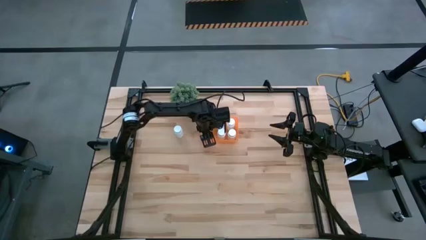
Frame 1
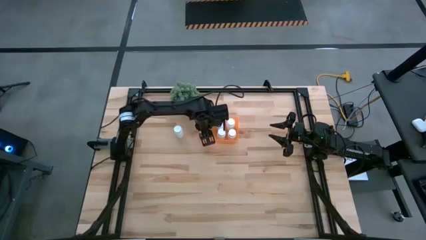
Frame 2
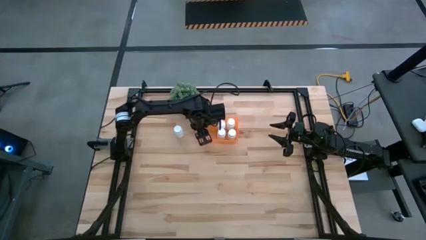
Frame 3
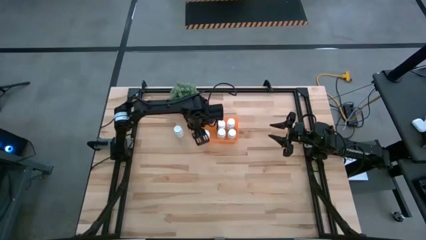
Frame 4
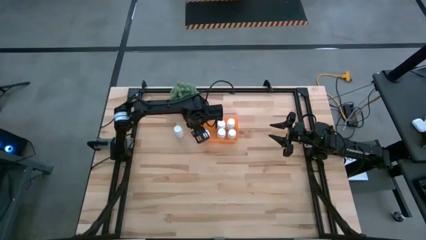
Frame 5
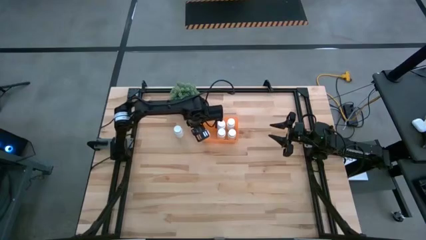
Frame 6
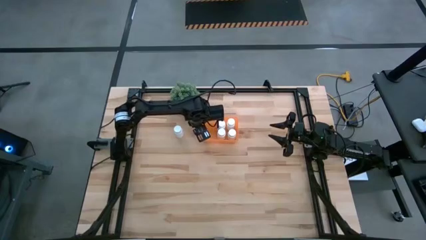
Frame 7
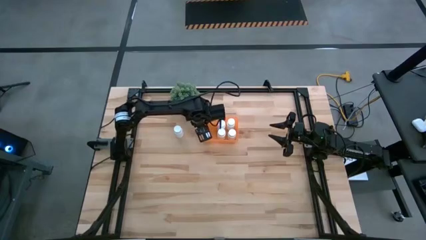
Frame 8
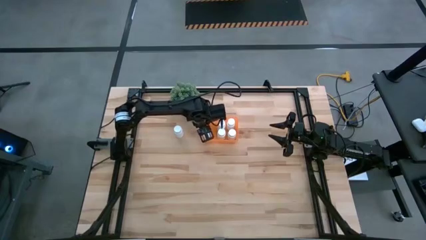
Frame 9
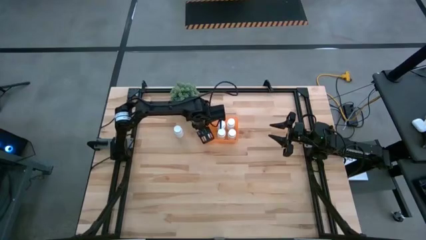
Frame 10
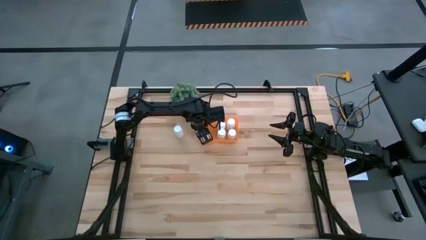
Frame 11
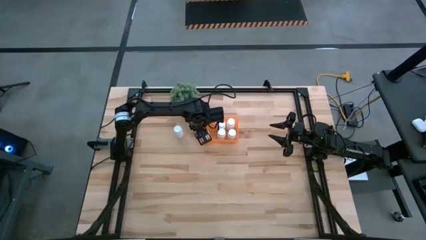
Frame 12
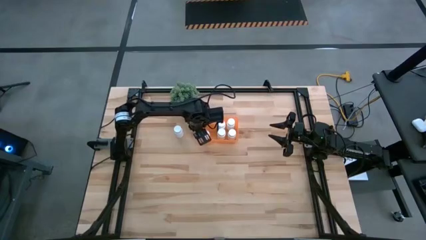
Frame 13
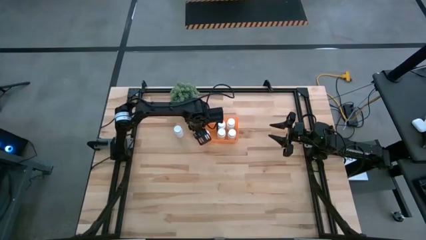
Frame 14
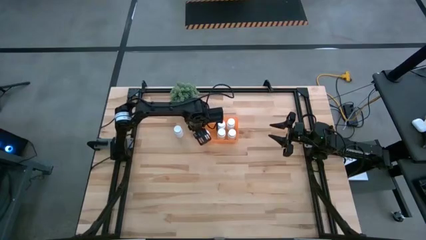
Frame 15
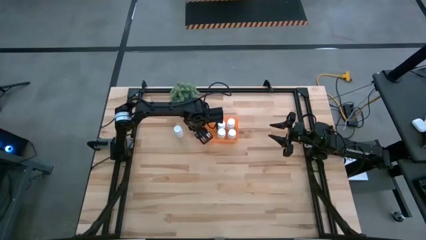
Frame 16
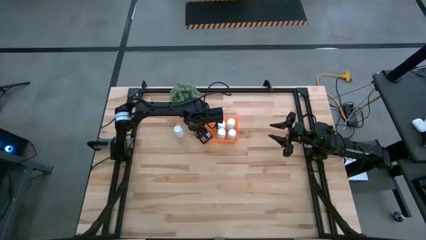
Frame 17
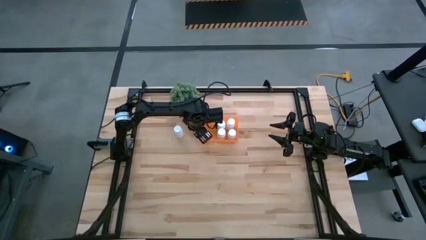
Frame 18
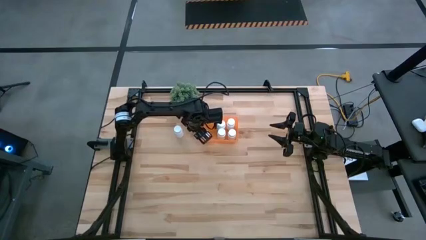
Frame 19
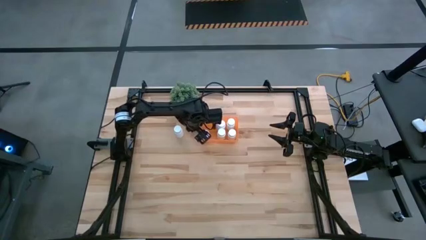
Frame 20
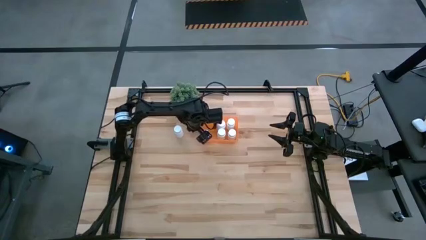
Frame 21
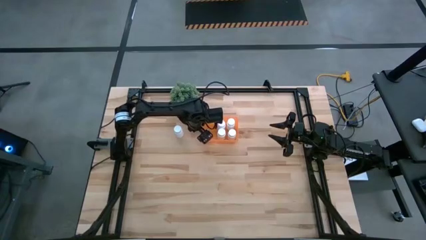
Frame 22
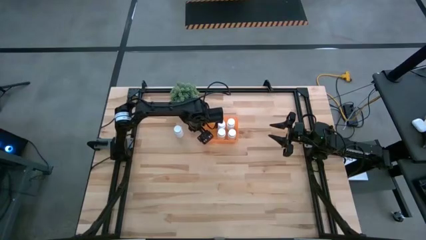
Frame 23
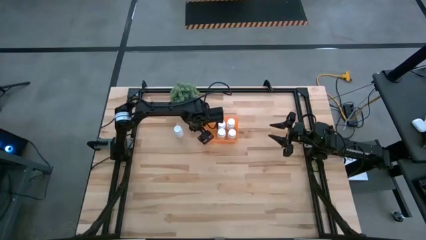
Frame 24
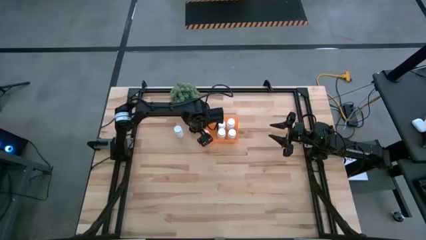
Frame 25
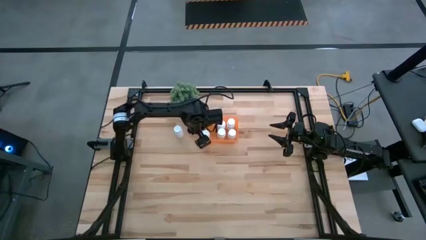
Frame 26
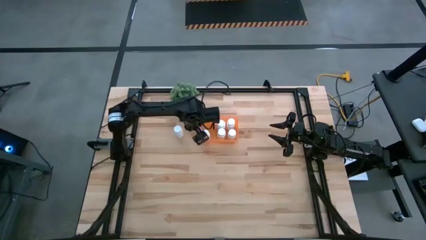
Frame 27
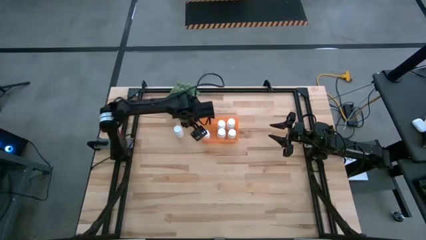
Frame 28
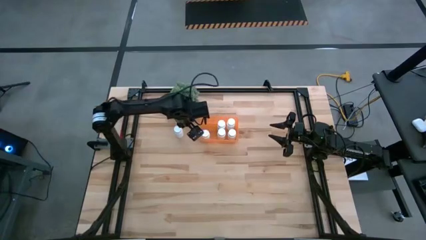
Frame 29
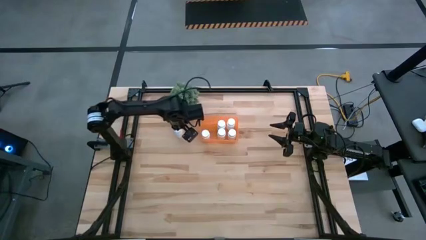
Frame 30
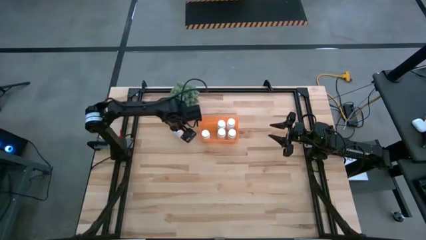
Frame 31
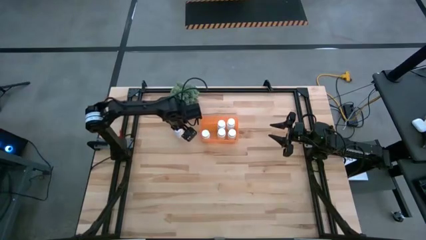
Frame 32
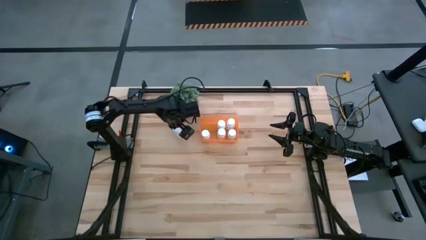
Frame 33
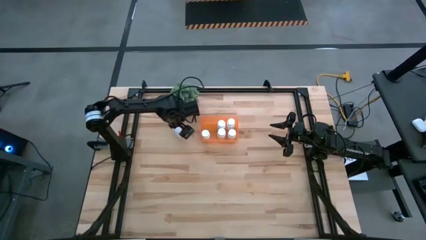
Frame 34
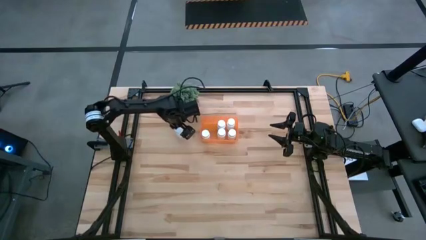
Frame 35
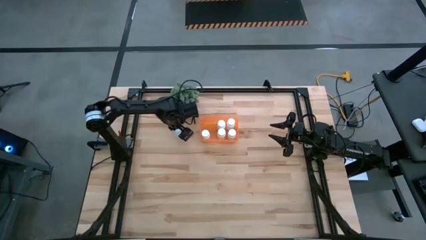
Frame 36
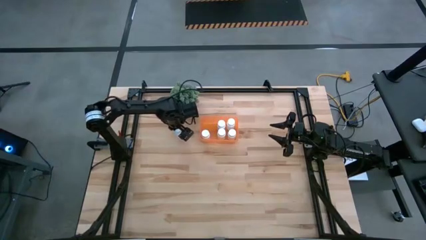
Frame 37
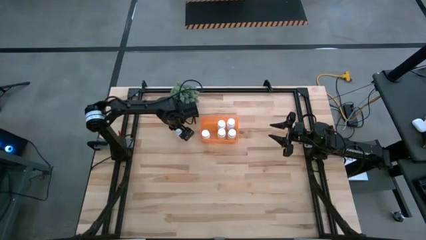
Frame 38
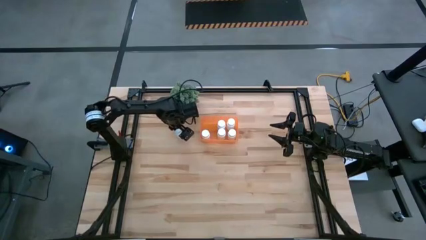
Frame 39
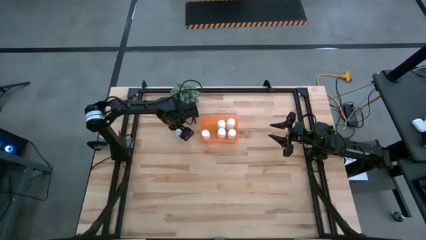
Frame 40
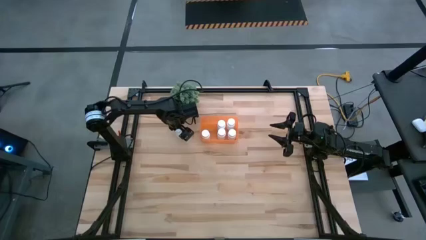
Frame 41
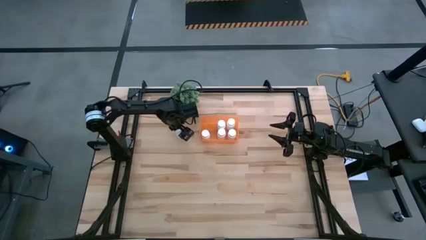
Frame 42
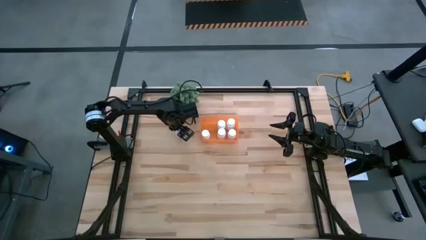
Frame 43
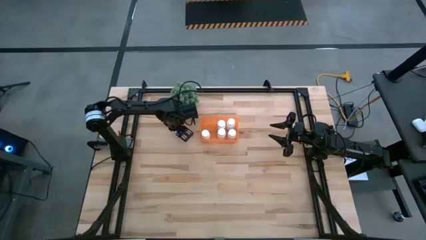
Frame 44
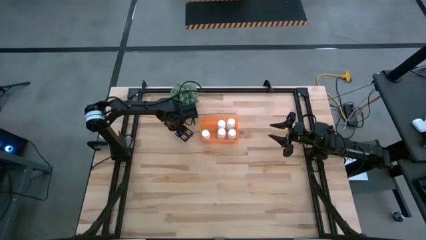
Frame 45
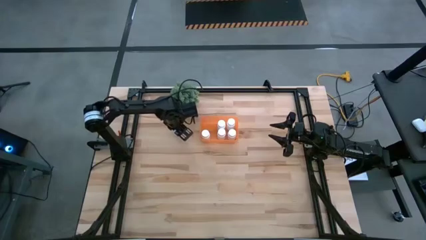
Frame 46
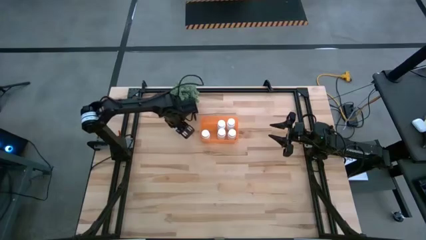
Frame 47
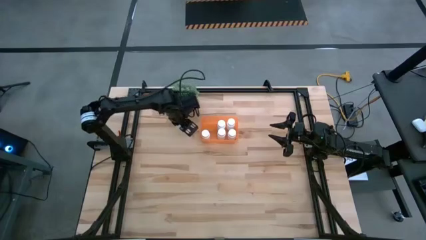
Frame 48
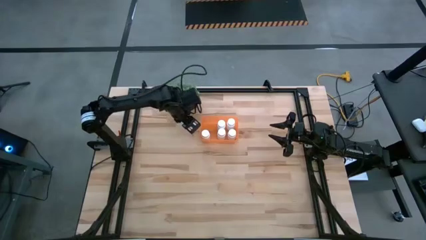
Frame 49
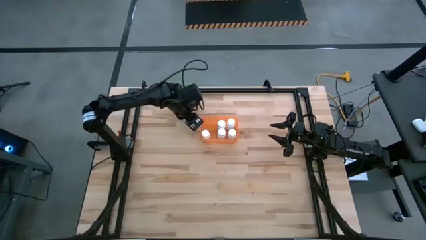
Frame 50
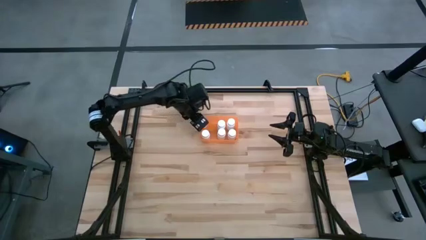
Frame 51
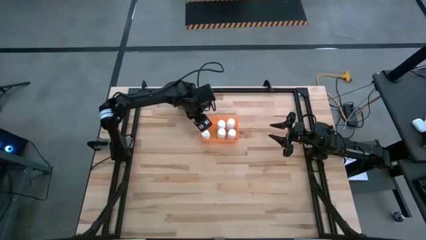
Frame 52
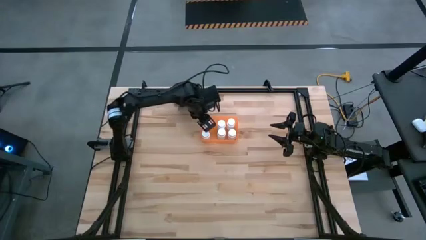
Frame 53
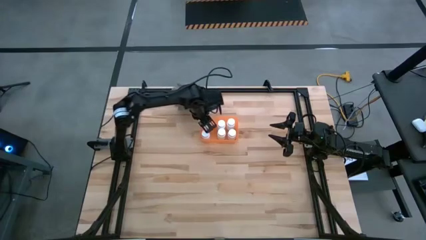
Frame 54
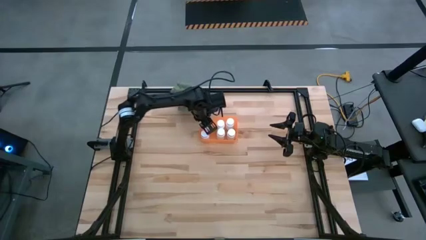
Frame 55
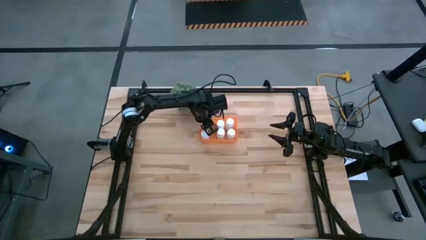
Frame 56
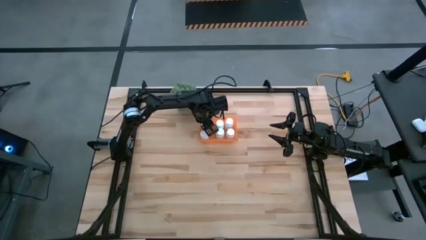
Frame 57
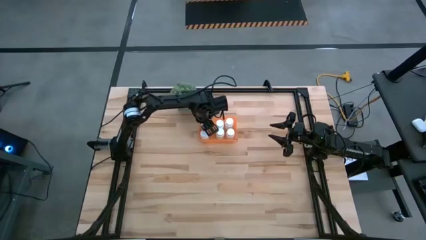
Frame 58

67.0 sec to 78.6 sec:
Task: Pick and place pill bottles into a basket
Put the white pill bottle into the orange bin

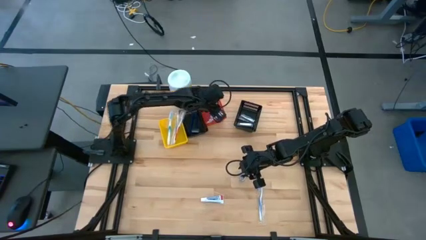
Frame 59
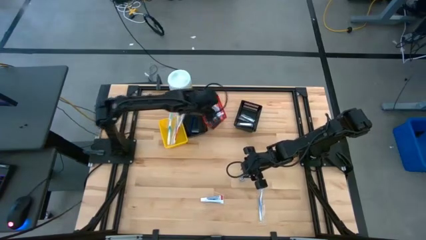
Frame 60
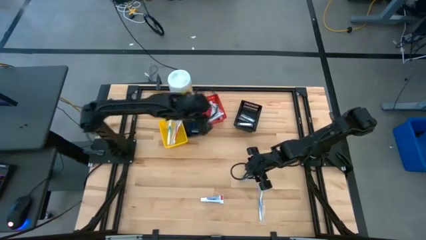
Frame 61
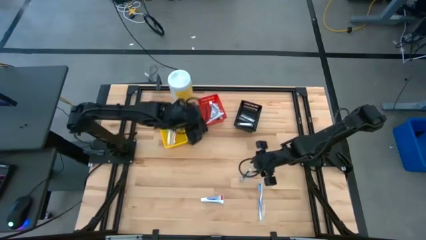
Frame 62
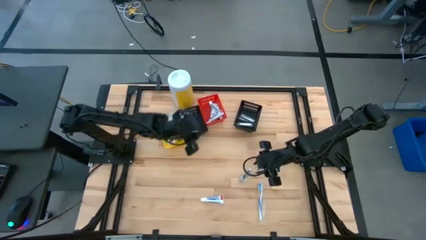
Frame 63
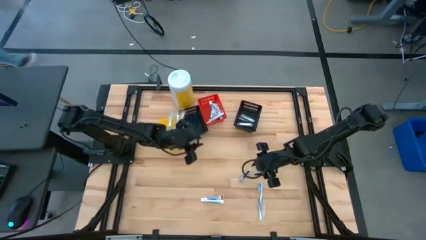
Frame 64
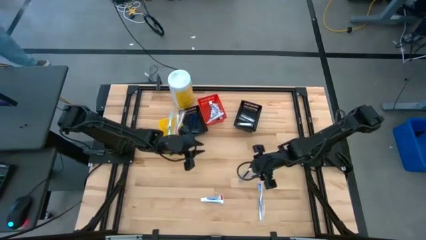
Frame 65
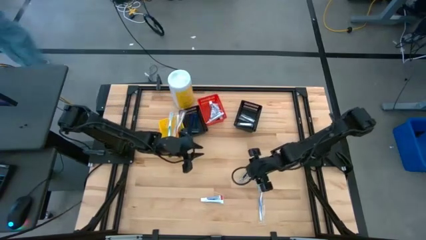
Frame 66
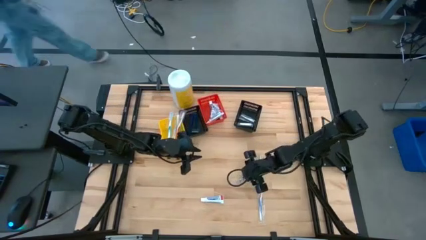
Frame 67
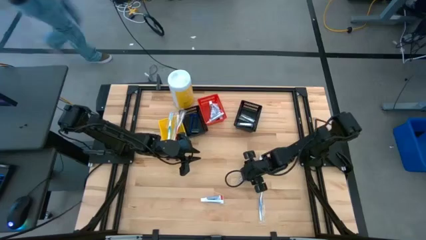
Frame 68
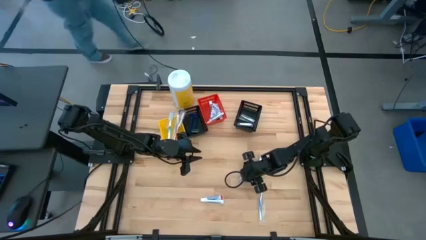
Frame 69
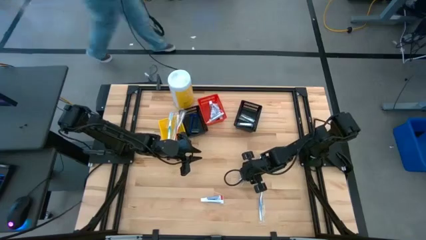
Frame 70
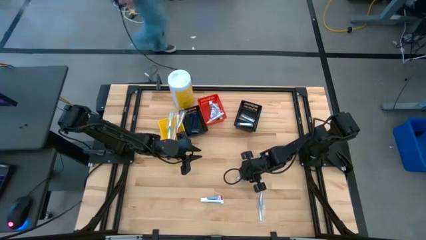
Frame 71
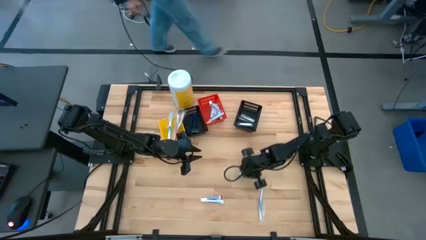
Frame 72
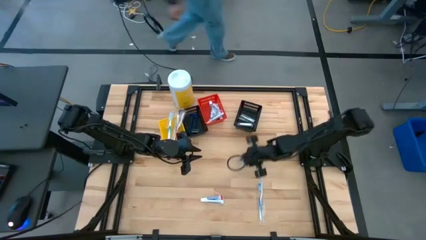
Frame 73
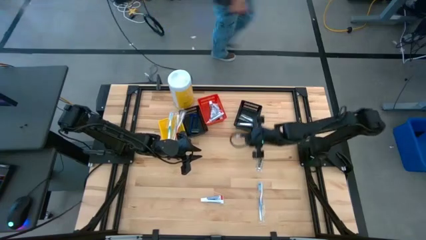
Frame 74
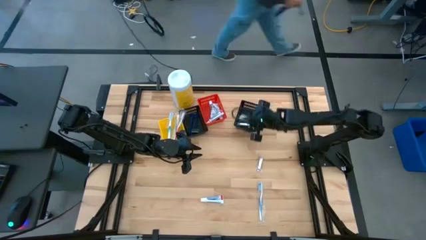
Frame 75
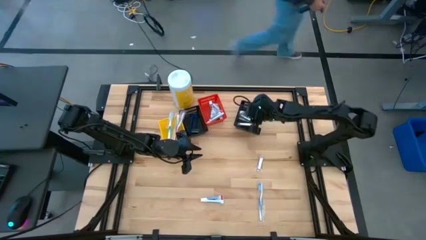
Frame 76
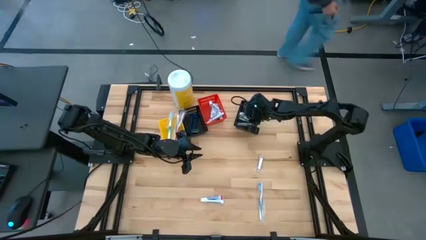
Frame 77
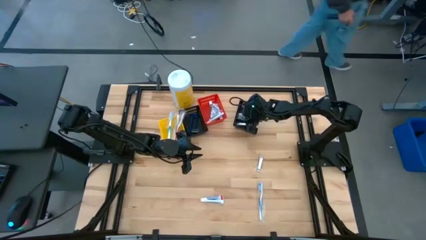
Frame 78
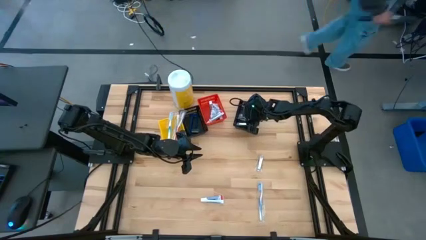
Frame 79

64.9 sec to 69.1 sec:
Task: Pick & Place Travel size toiletries
Put the silver nail cutter into the right black bin

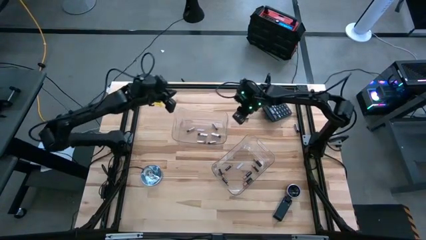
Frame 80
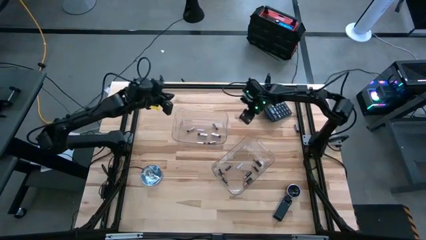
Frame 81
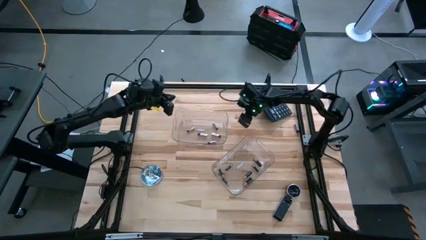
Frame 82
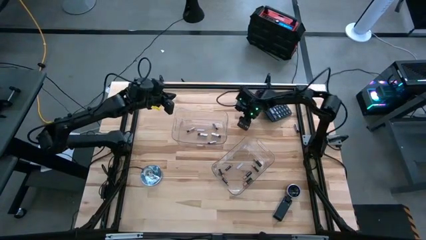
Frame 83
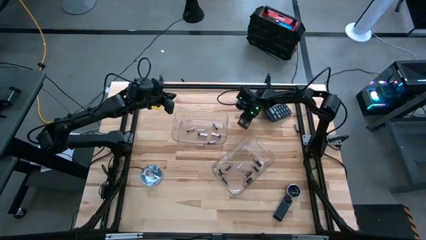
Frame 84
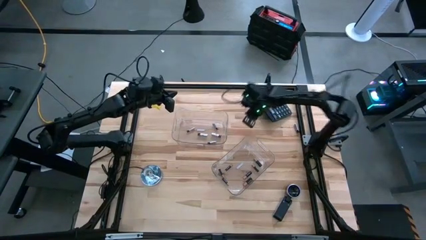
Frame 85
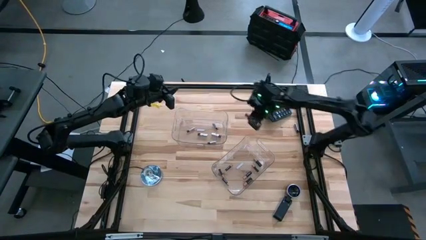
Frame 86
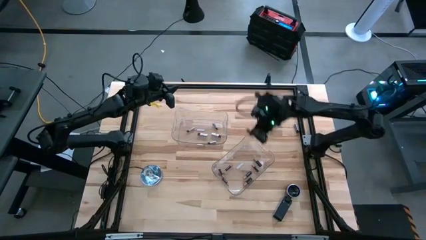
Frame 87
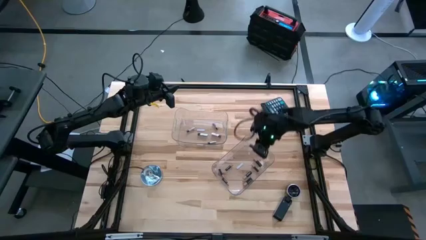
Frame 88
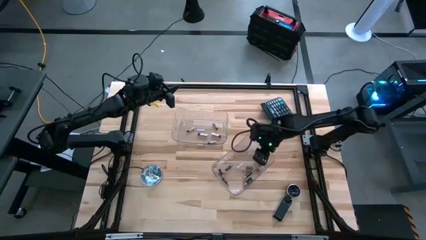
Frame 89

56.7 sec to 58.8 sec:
Task: Sort batteries
Put the black battery into the bottom transparent bin

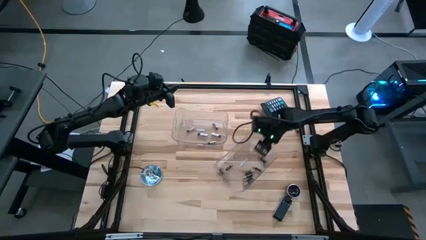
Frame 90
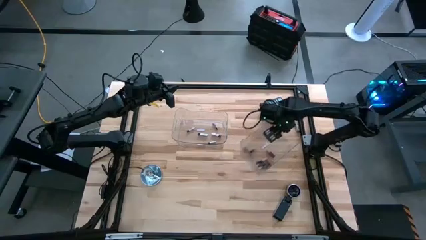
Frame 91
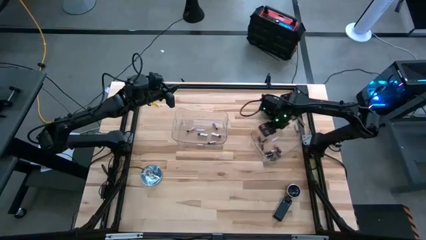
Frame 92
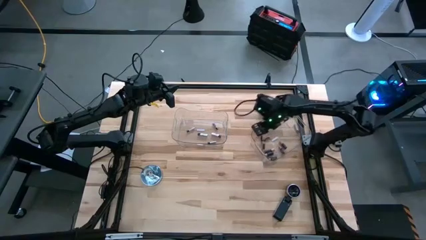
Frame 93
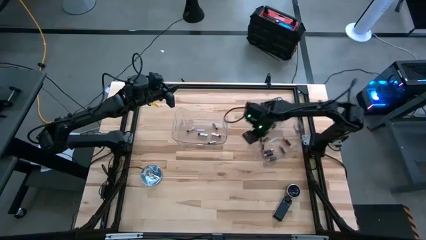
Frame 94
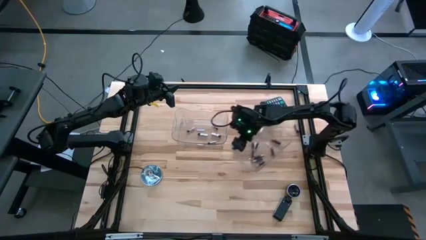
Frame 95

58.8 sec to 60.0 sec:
Move the bottom transparent bin to the middle right
